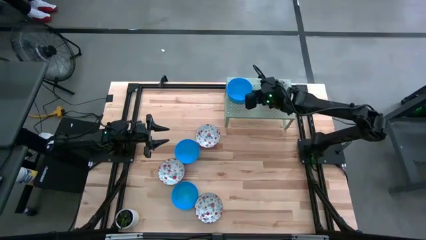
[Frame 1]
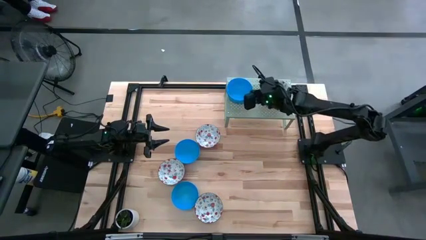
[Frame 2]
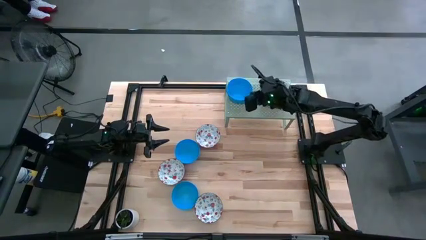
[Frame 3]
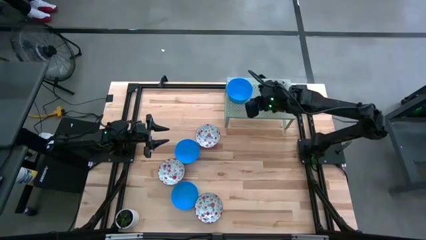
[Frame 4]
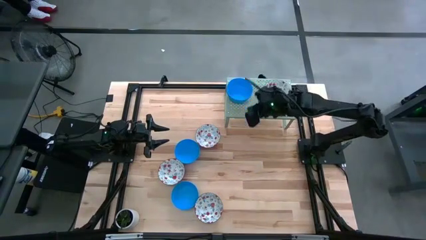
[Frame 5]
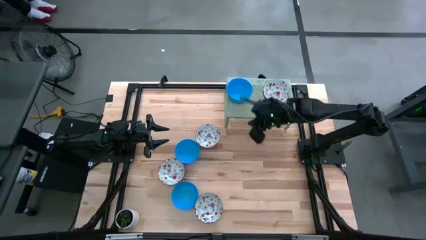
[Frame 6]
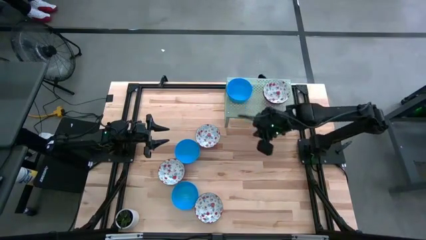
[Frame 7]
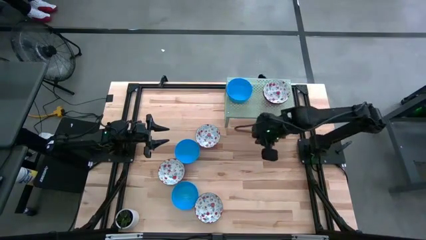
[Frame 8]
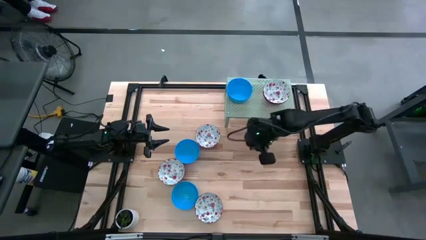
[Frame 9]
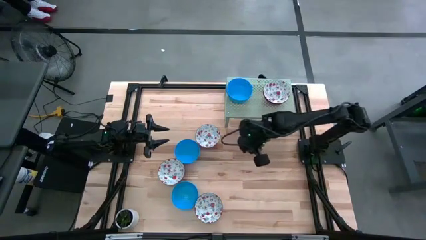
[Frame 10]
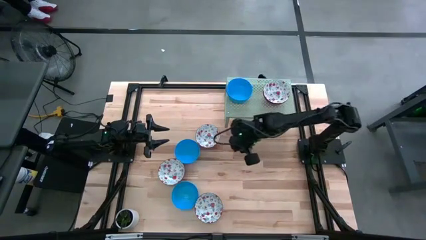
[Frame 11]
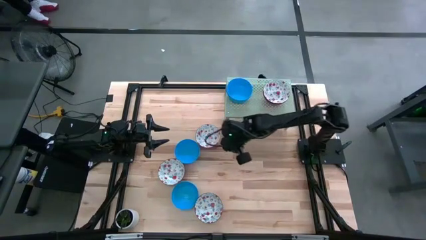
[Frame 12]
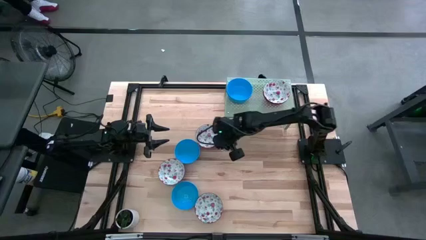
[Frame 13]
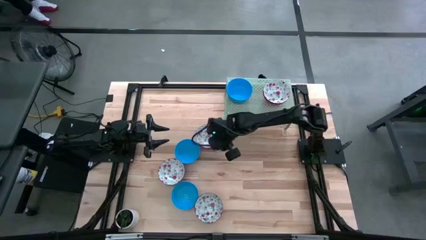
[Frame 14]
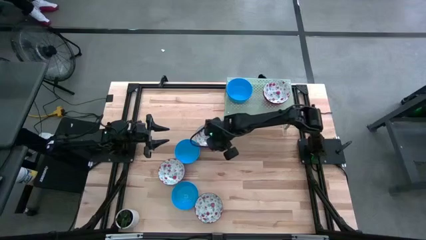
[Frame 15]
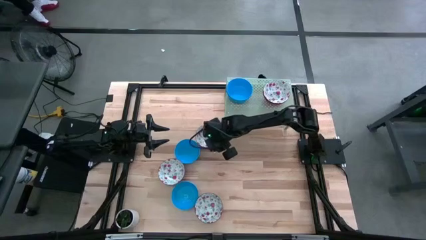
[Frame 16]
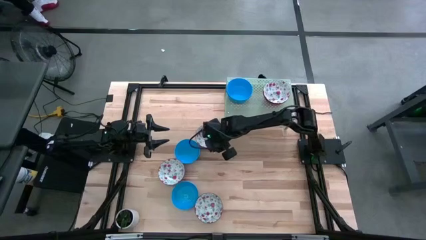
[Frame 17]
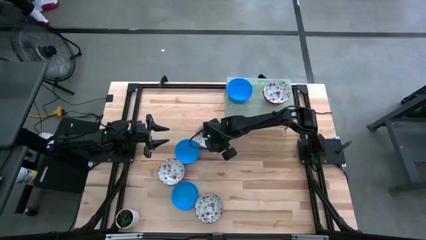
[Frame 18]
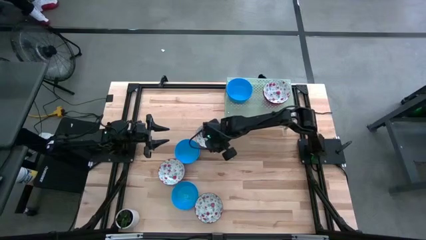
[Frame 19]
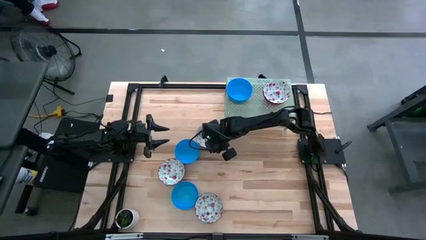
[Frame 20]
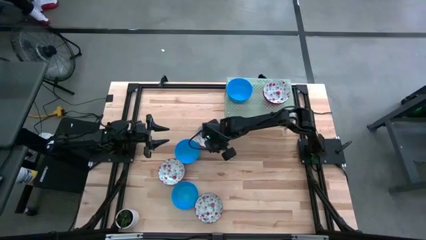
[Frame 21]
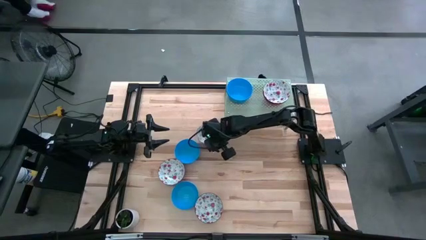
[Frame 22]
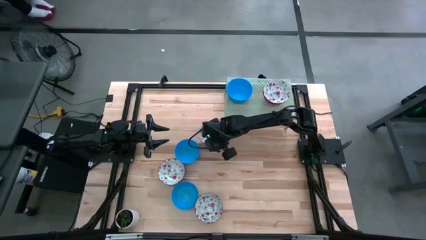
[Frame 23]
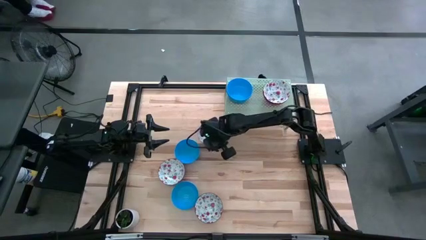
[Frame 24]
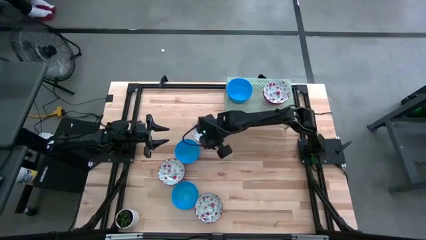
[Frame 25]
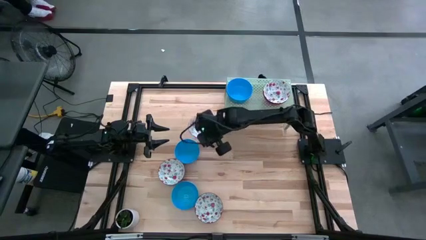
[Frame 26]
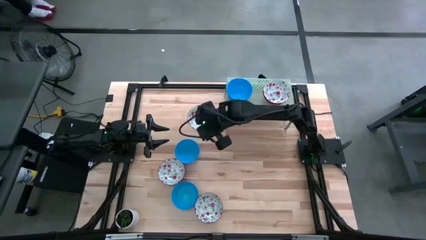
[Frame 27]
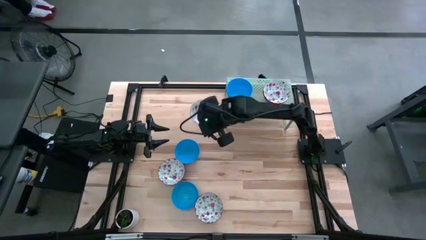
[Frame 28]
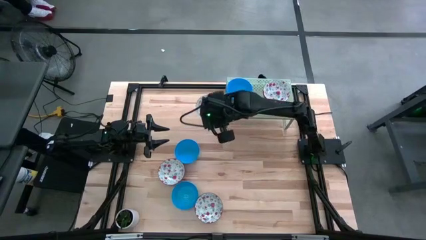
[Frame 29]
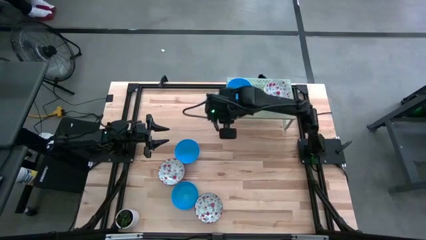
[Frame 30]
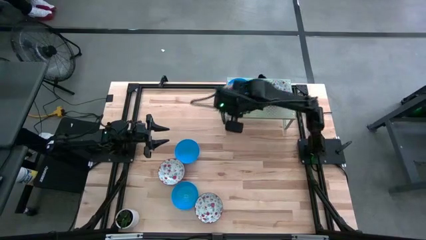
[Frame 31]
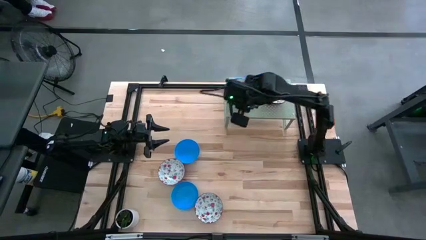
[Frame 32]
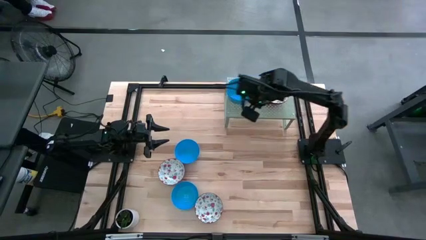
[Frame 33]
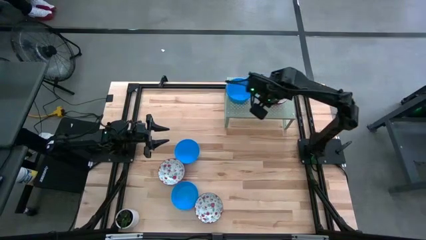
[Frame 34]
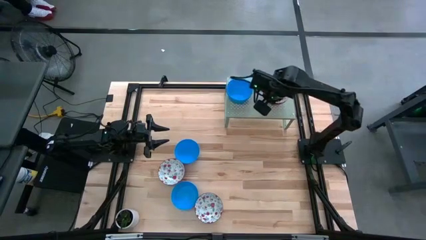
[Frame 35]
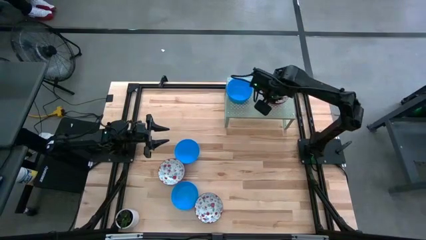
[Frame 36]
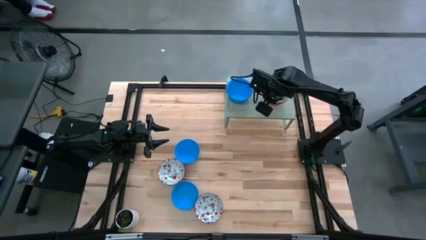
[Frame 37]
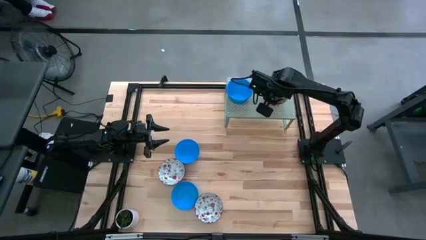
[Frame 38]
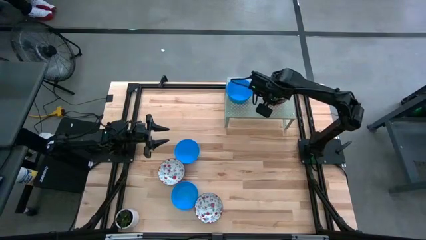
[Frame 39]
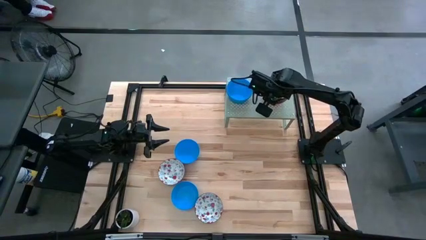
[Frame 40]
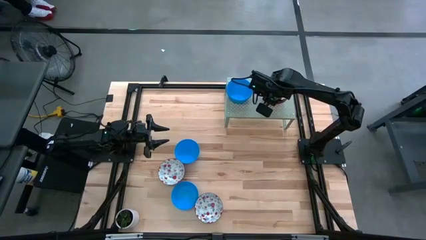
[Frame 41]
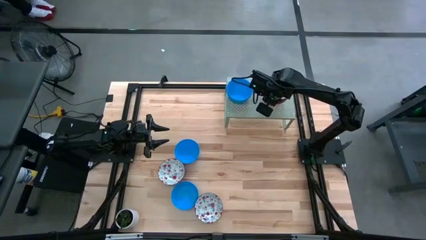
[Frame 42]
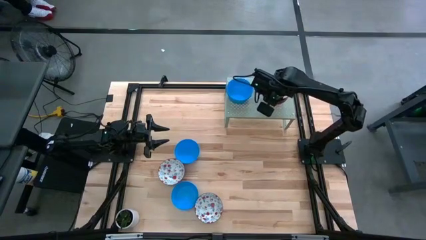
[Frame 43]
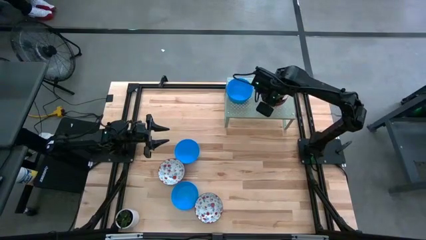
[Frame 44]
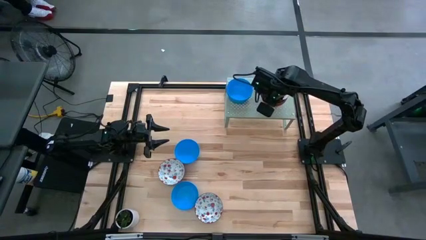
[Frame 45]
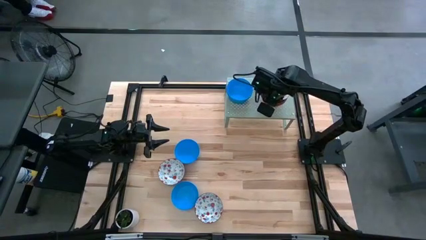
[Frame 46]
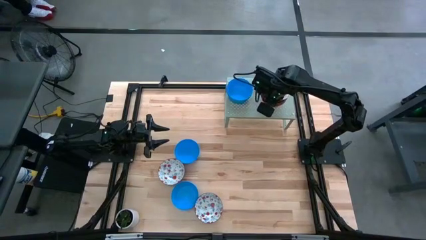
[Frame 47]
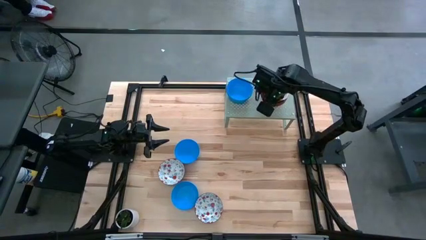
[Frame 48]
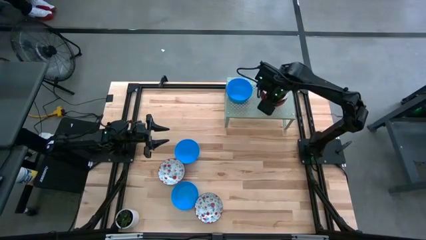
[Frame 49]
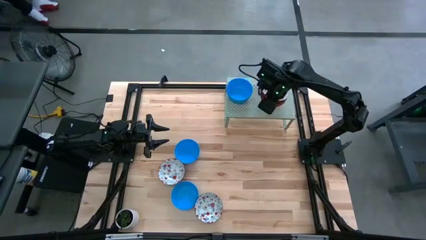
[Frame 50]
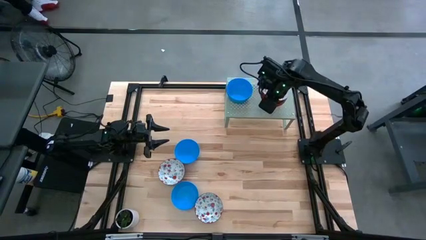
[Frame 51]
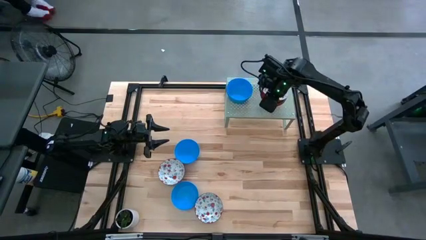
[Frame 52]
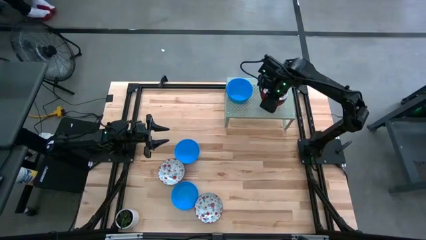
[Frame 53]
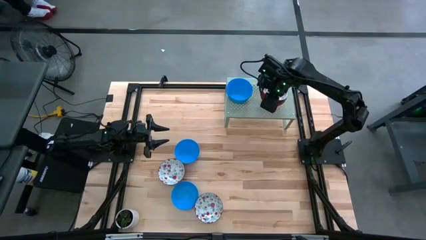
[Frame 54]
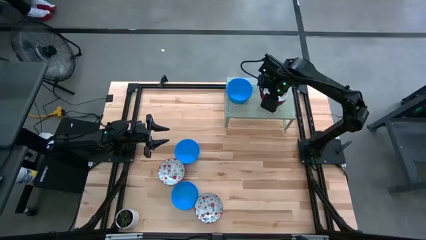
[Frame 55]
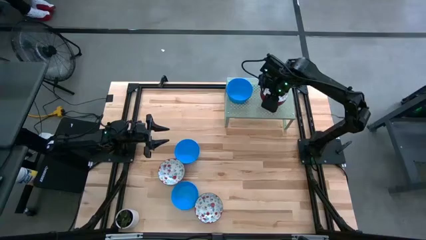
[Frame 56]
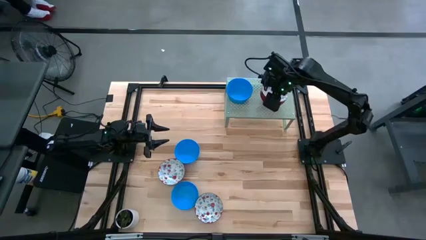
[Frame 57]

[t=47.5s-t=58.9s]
Task: Pick & Place Mini bowls
Stack the white bowl on the white bowls on the shelf
